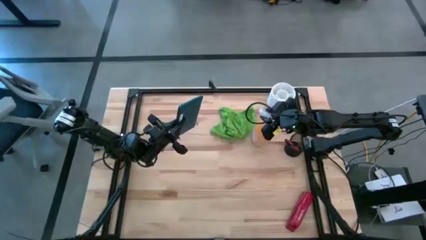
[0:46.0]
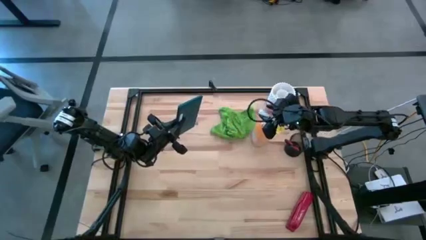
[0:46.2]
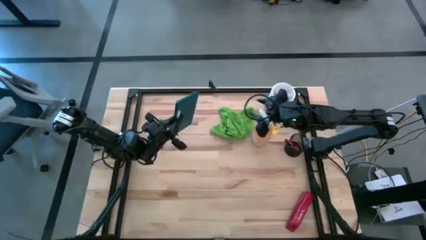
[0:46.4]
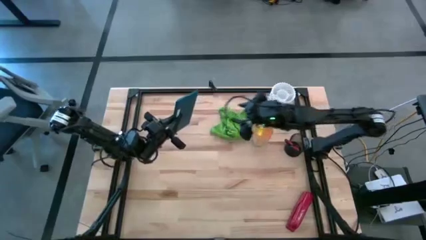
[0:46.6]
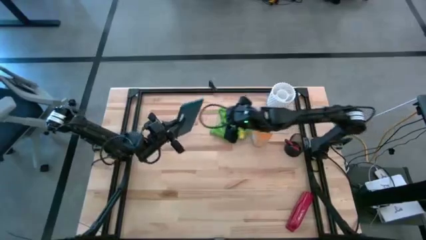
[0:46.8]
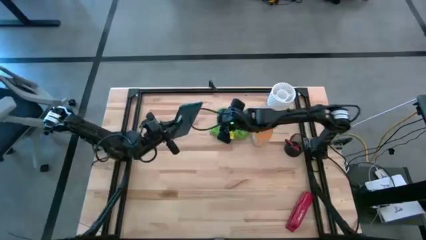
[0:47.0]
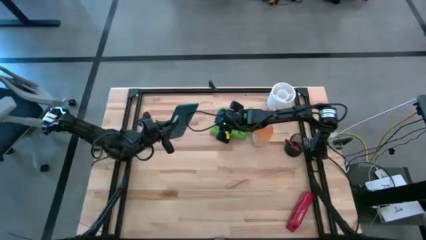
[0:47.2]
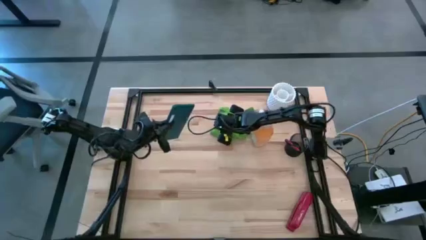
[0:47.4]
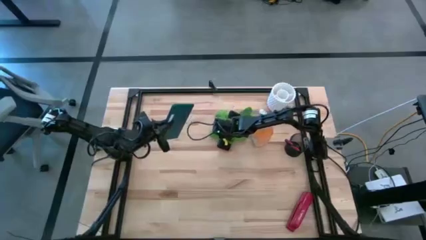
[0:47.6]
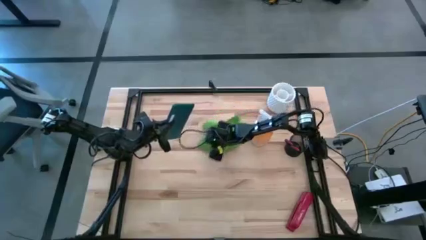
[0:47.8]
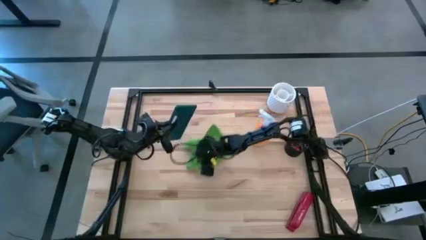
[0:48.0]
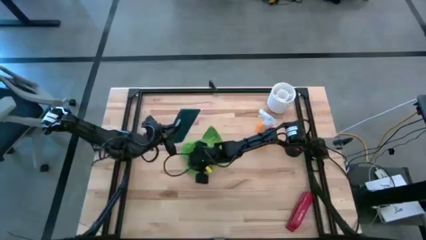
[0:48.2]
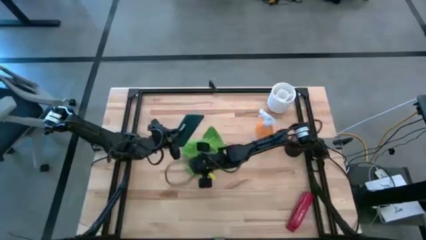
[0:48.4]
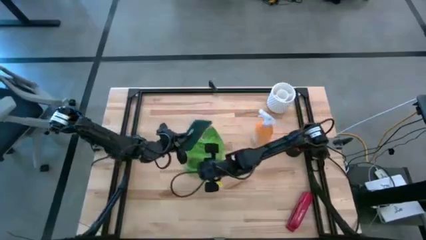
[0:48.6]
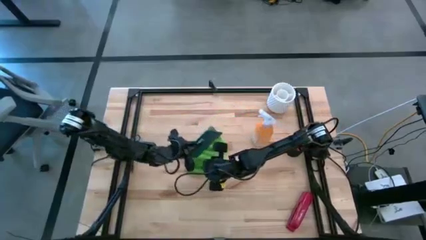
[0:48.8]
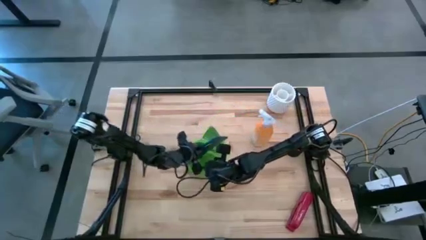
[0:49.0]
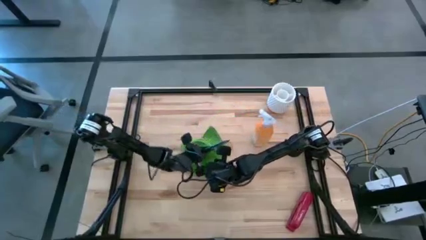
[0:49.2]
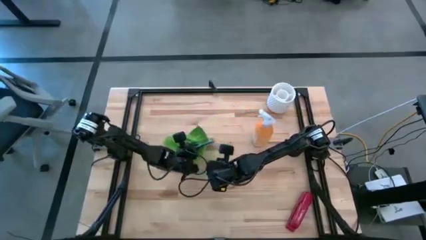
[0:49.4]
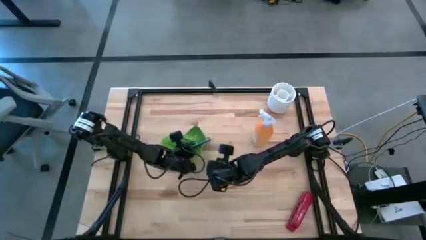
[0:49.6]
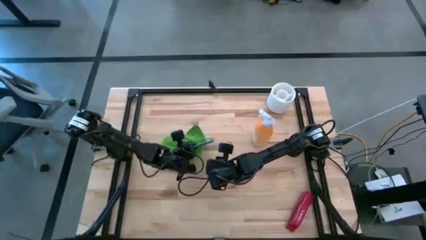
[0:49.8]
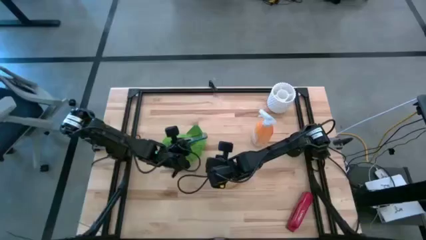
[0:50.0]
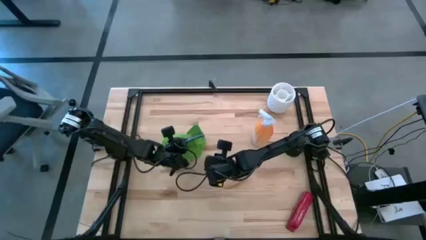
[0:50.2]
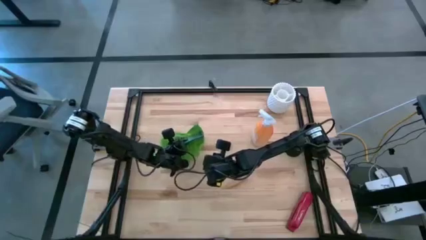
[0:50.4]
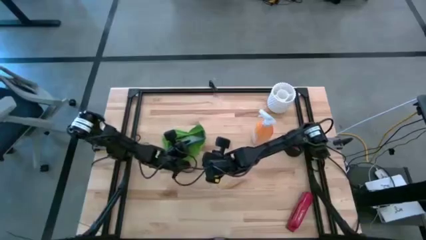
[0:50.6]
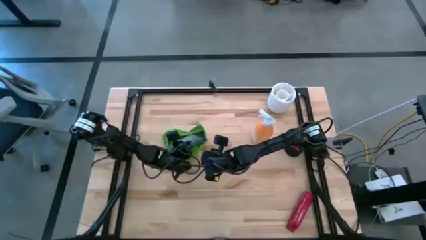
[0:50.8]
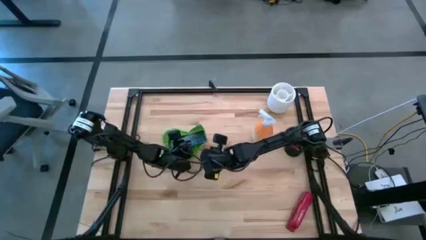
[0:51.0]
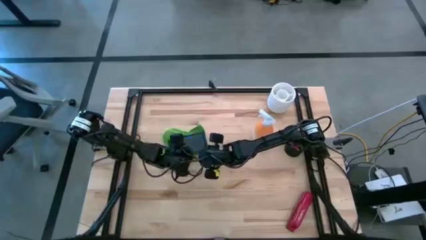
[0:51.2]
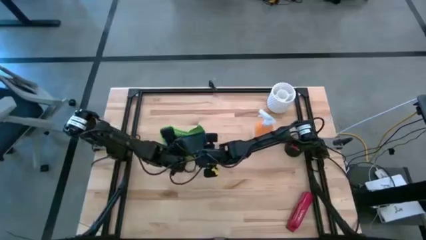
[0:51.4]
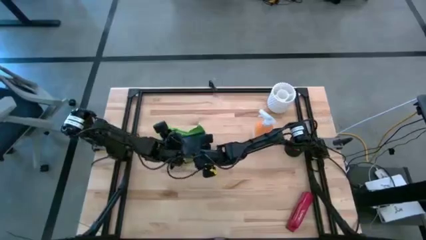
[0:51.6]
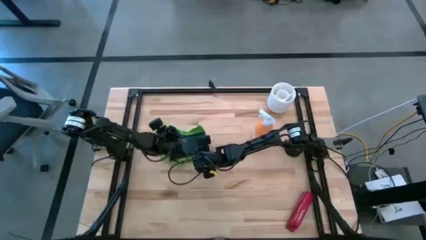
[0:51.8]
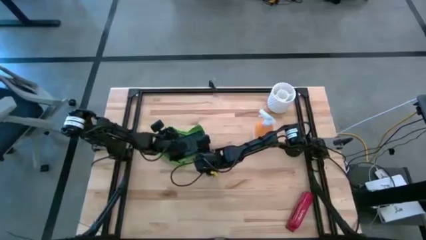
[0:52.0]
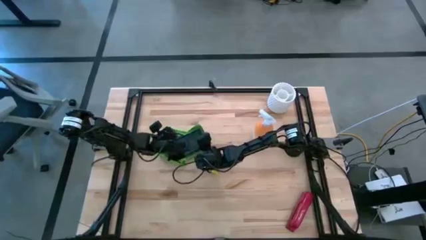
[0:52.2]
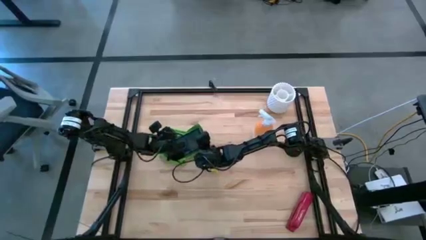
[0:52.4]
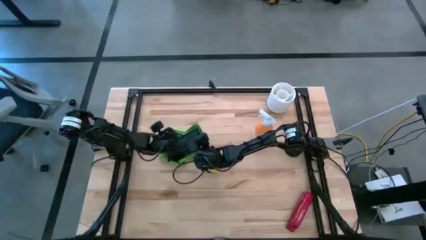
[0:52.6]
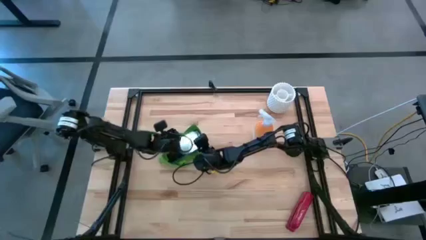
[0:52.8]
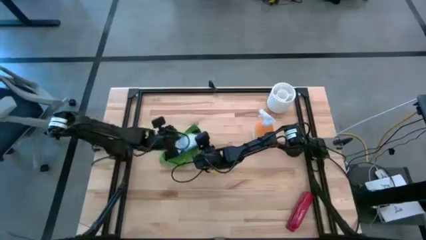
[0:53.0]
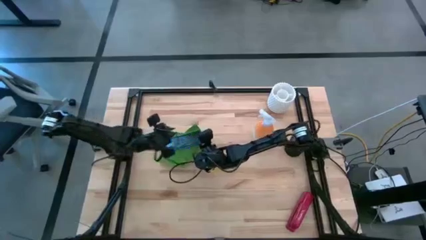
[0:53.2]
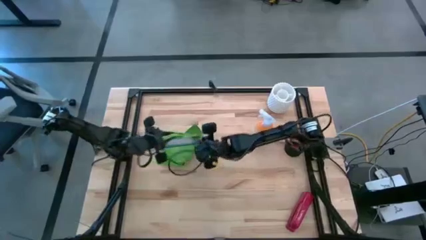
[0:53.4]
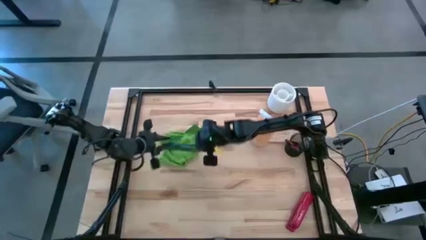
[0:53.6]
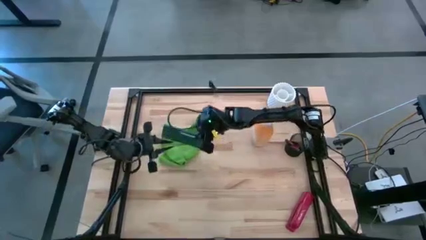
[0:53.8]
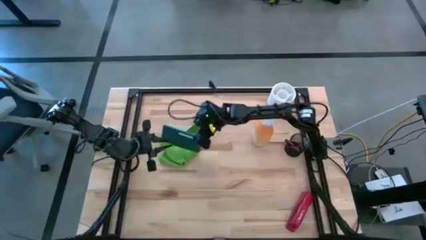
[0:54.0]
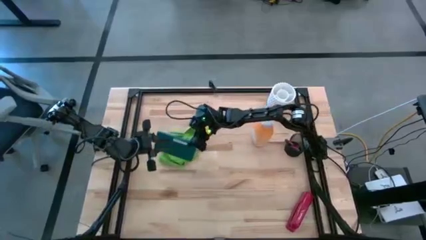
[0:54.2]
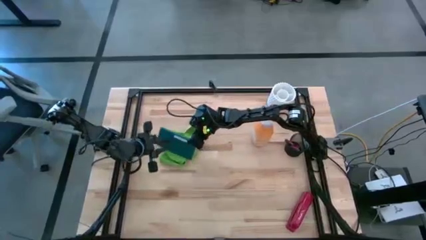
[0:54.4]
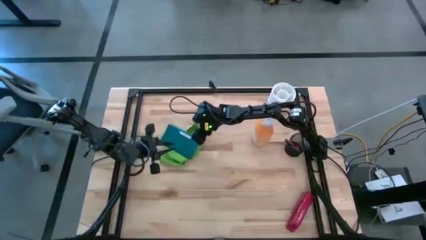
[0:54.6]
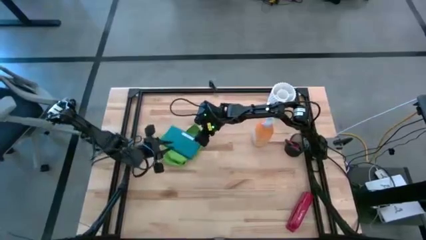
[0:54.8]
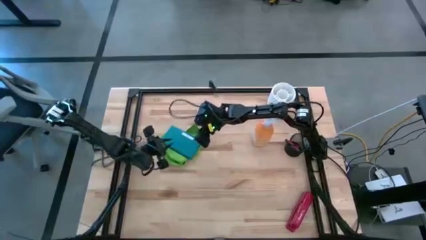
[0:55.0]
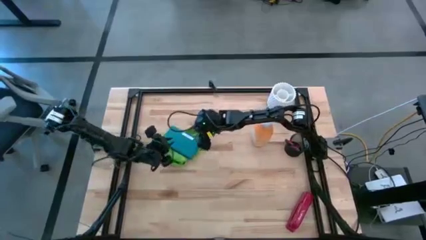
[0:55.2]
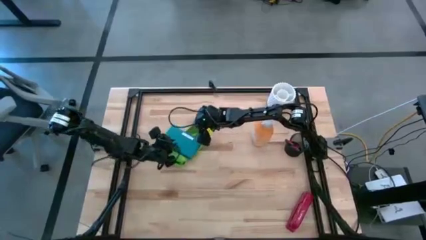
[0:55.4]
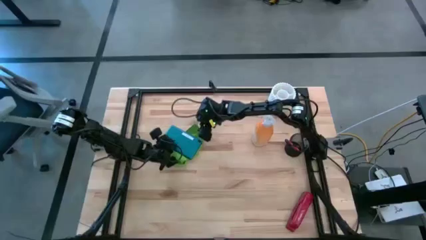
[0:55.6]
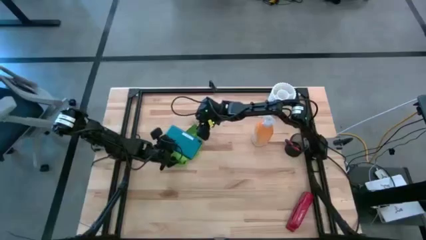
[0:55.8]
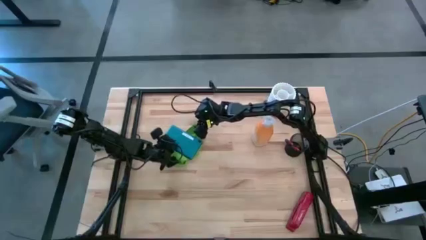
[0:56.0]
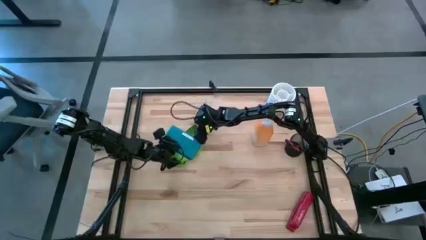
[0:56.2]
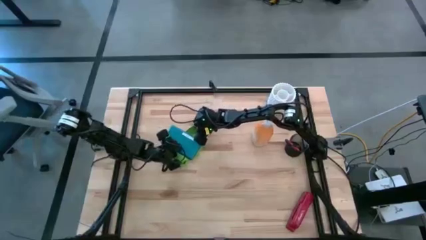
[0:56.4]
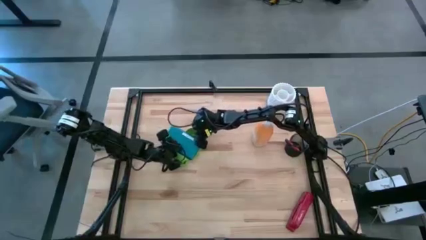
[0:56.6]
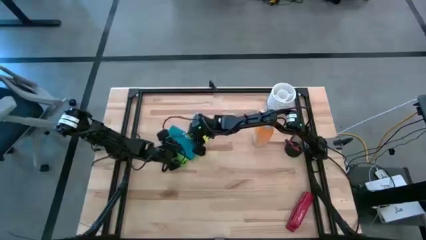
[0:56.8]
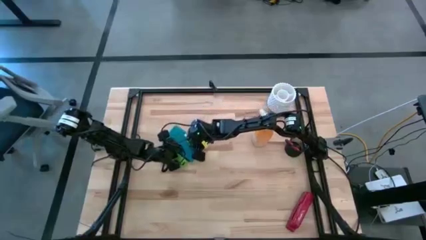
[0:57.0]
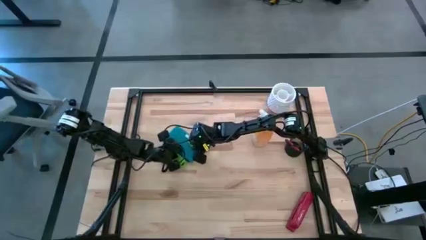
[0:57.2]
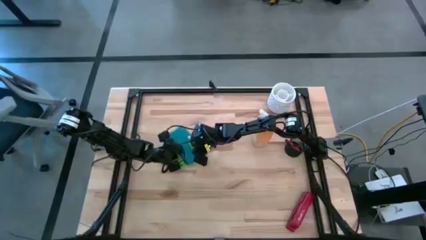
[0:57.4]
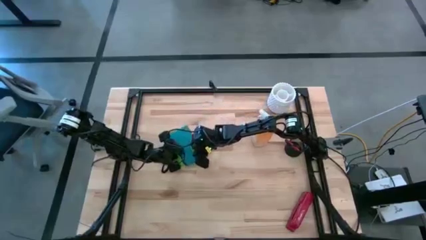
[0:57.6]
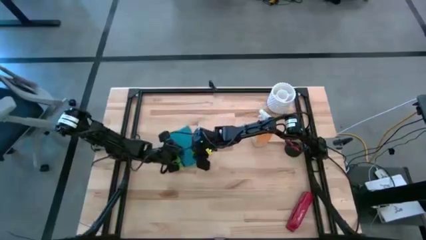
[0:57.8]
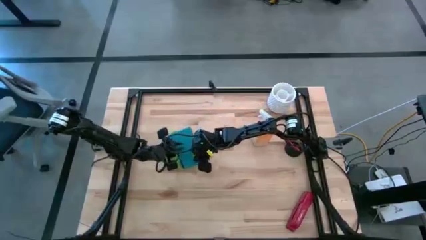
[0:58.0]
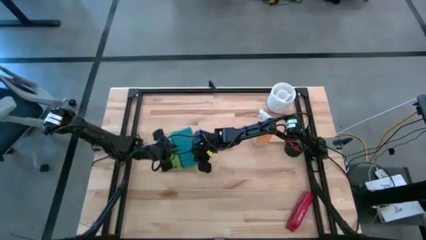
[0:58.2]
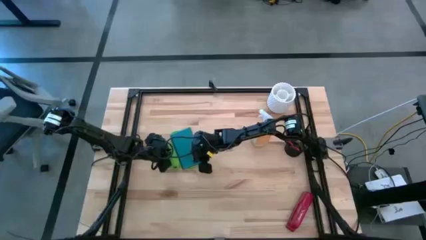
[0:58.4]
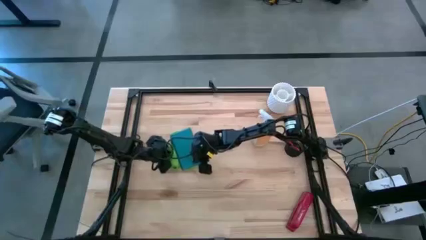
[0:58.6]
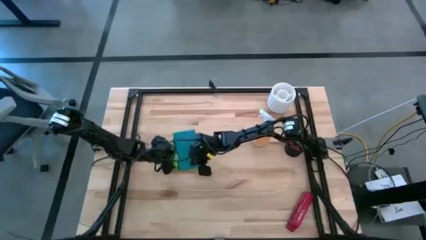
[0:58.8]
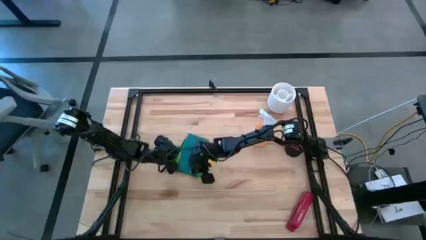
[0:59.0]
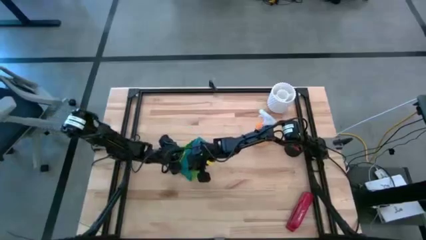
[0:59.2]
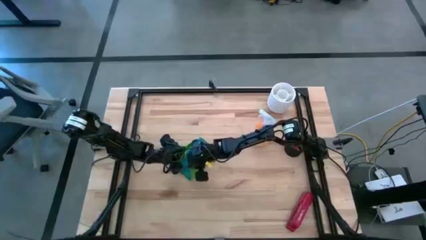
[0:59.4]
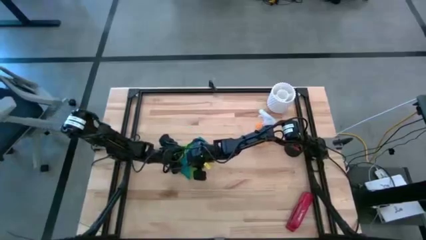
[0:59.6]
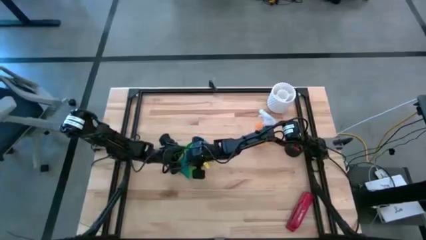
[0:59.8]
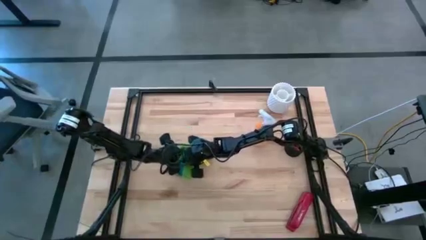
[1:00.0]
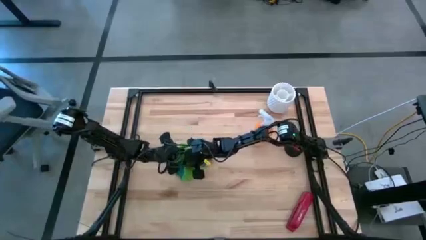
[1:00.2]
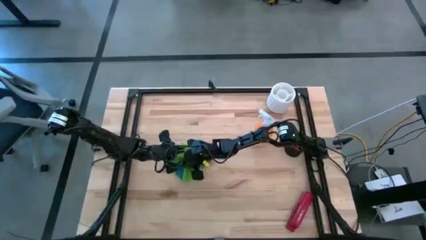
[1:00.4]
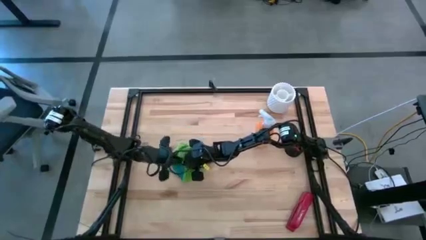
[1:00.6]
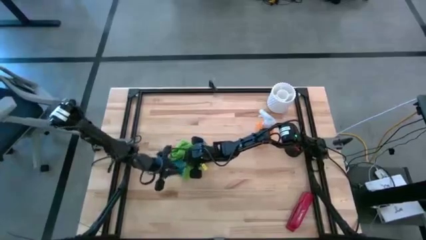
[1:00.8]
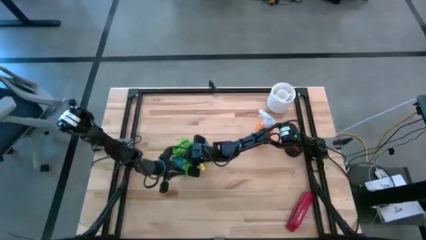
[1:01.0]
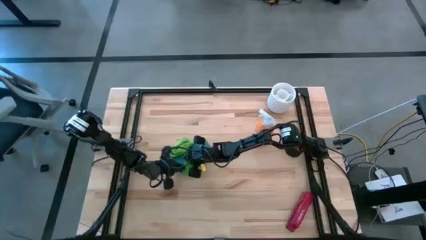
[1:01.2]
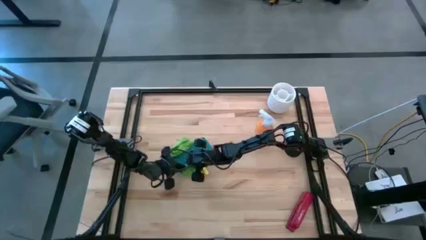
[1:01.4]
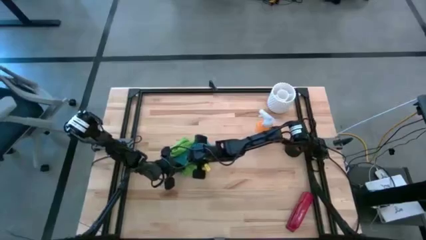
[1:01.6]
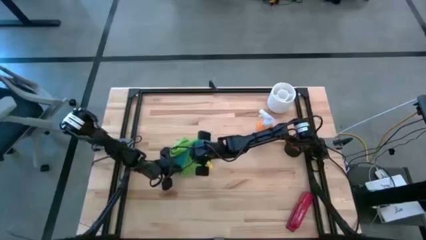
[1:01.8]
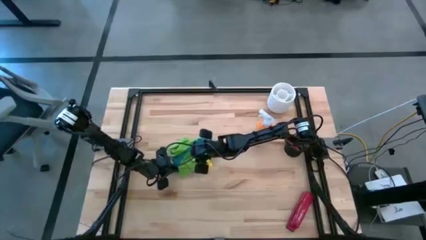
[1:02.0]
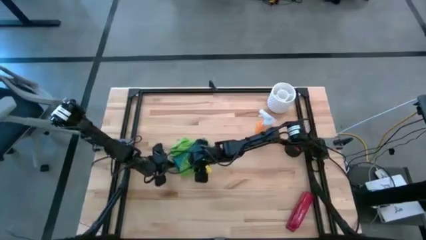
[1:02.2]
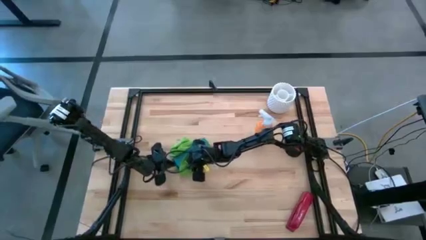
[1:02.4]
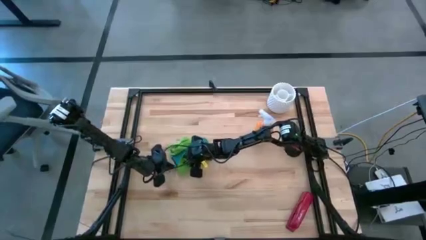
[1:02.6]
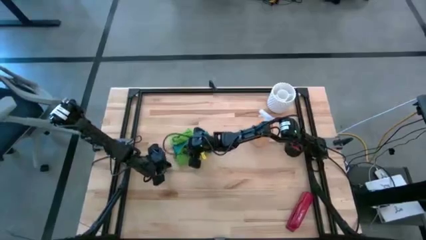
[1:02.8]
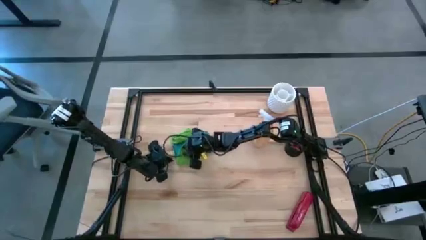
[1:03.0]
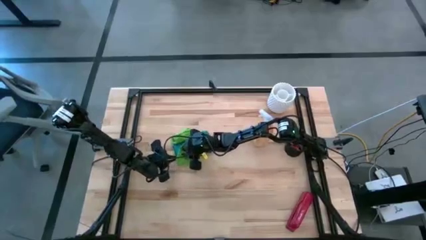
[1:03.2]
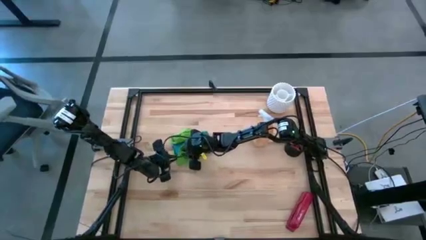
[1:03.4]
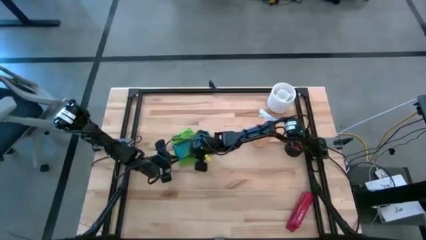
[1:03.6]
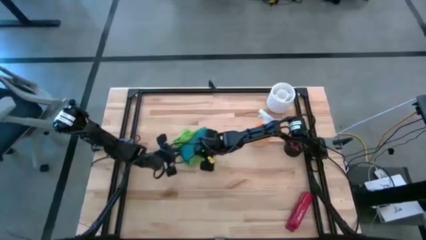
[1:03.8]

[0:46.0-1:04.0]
Task: Apply microfiber cloth
Wipe the back and front of the tablet with the green microfiber cloth
